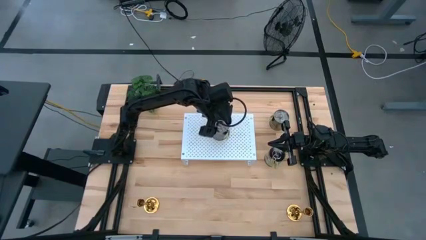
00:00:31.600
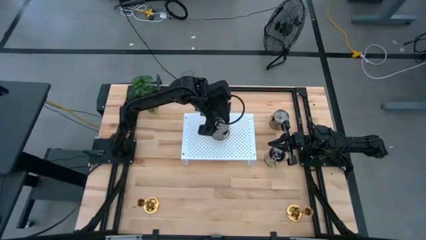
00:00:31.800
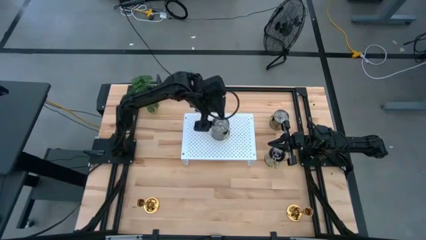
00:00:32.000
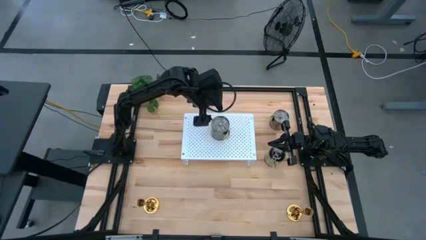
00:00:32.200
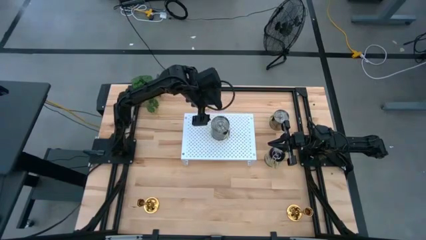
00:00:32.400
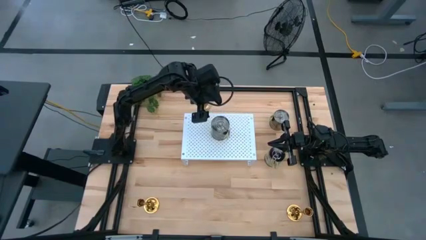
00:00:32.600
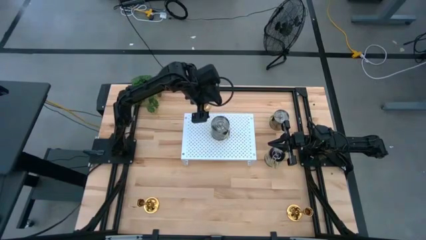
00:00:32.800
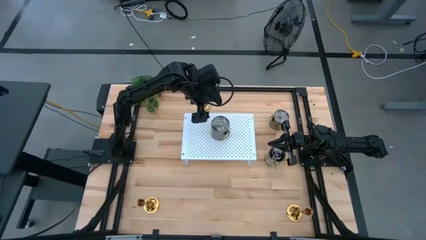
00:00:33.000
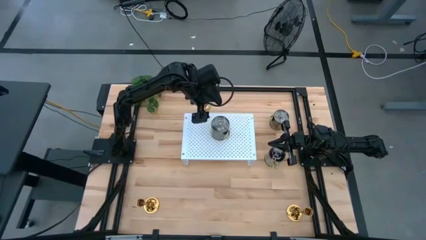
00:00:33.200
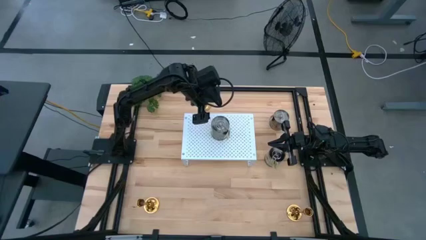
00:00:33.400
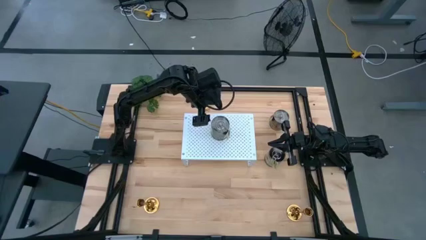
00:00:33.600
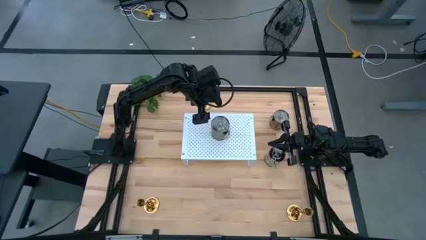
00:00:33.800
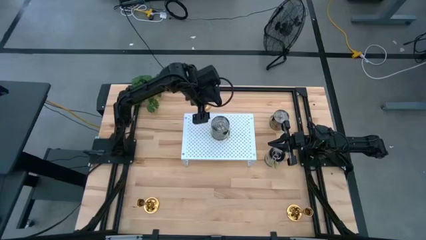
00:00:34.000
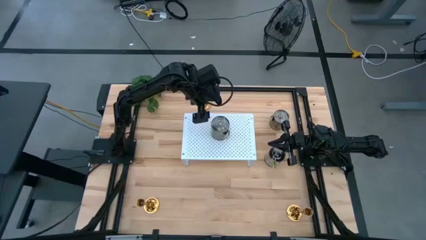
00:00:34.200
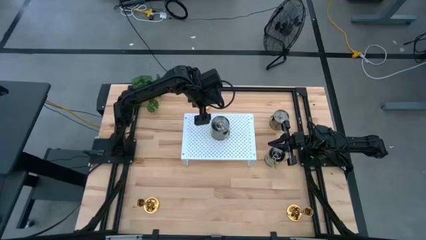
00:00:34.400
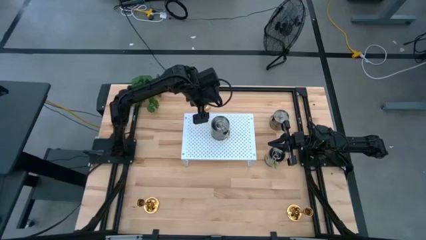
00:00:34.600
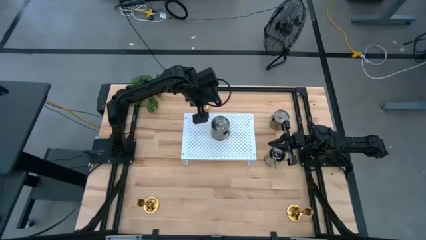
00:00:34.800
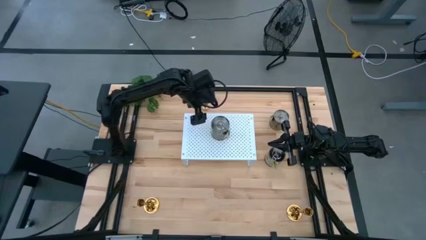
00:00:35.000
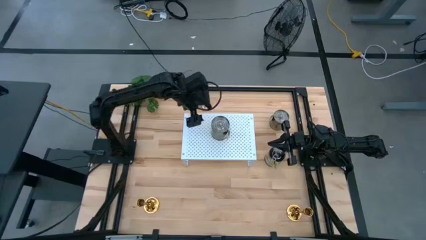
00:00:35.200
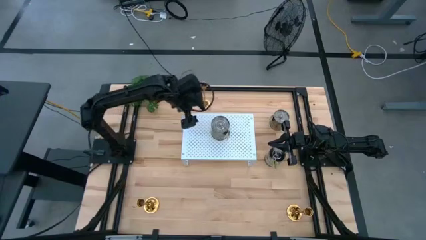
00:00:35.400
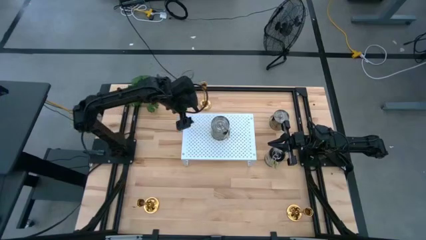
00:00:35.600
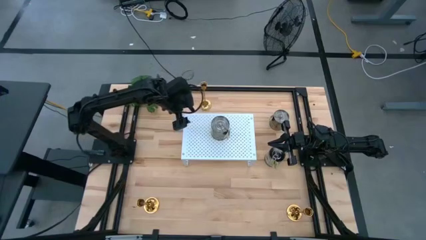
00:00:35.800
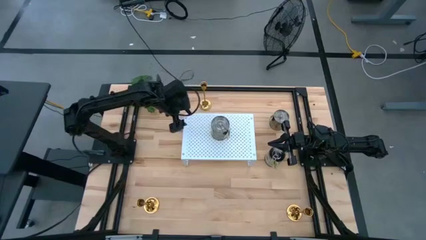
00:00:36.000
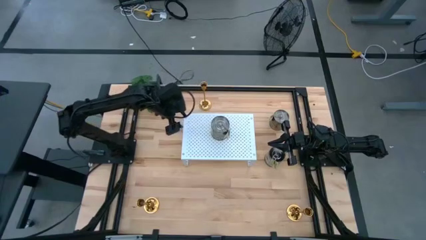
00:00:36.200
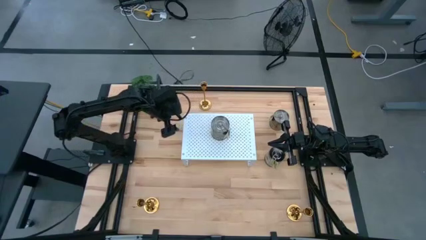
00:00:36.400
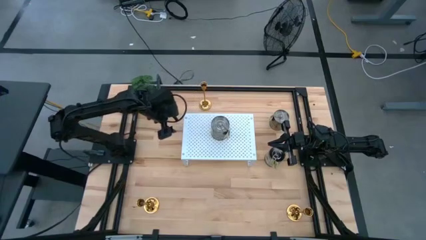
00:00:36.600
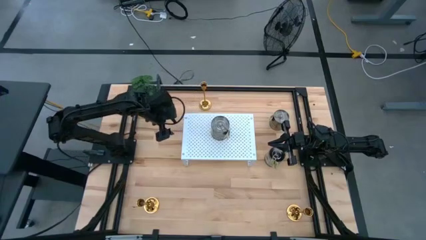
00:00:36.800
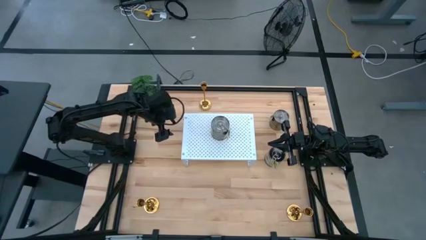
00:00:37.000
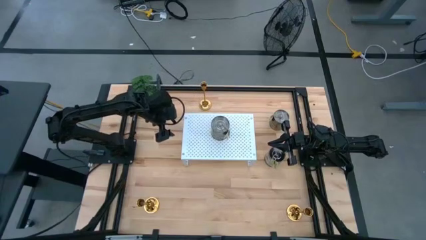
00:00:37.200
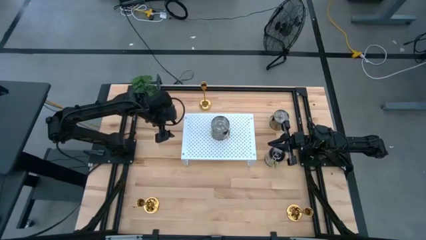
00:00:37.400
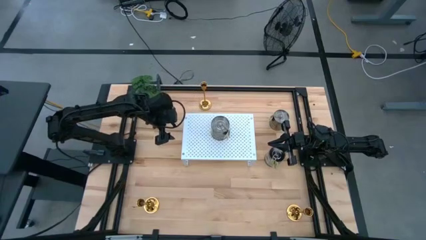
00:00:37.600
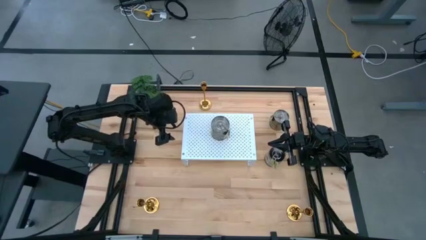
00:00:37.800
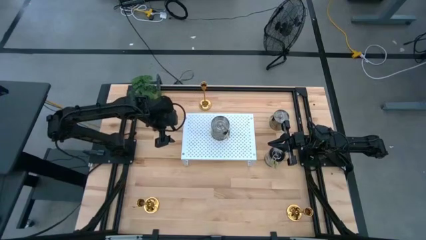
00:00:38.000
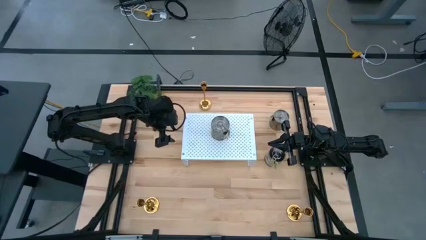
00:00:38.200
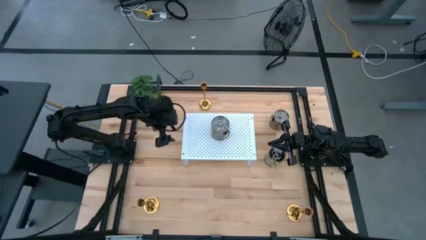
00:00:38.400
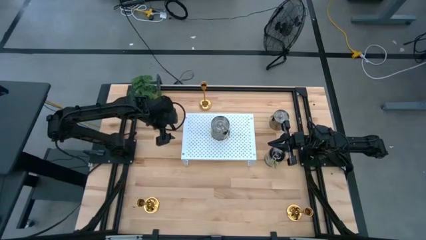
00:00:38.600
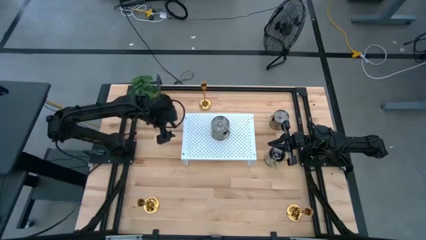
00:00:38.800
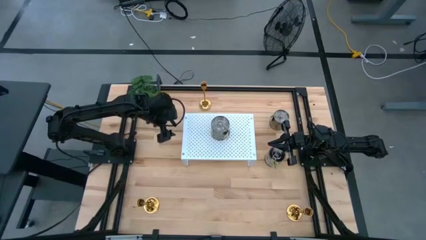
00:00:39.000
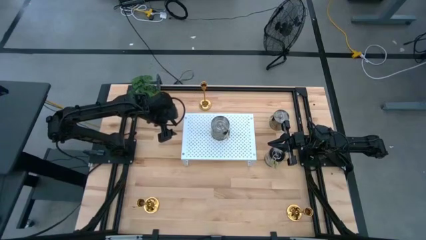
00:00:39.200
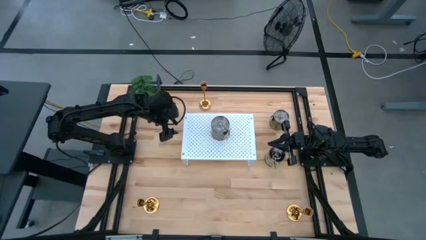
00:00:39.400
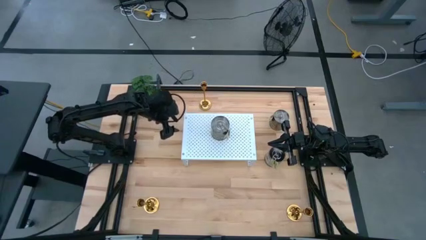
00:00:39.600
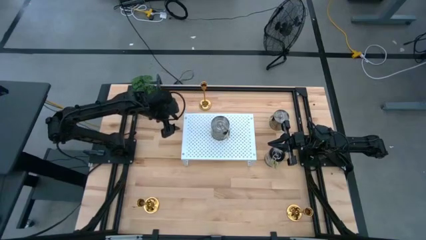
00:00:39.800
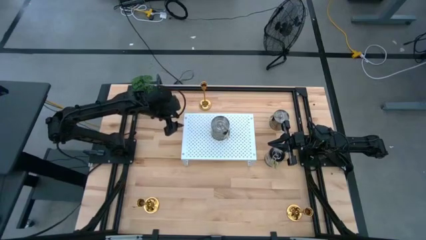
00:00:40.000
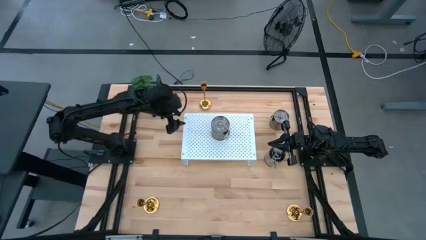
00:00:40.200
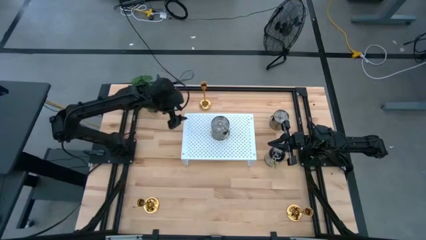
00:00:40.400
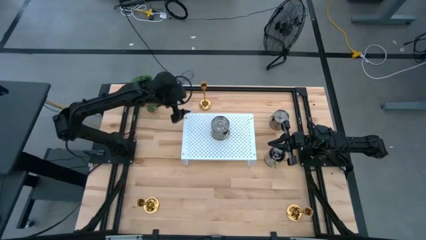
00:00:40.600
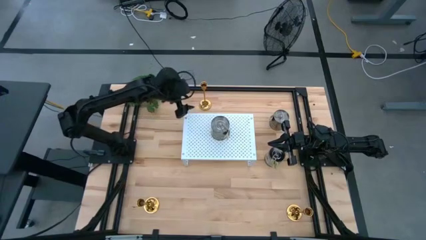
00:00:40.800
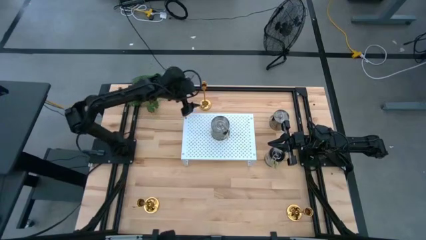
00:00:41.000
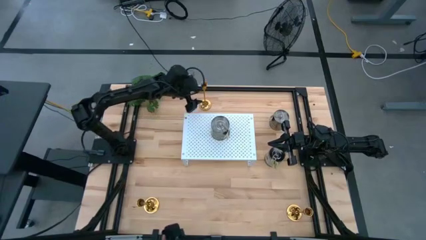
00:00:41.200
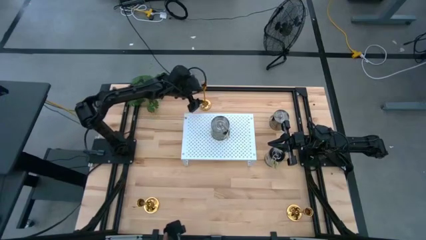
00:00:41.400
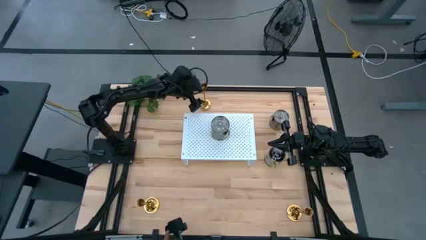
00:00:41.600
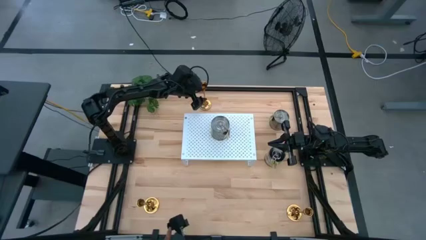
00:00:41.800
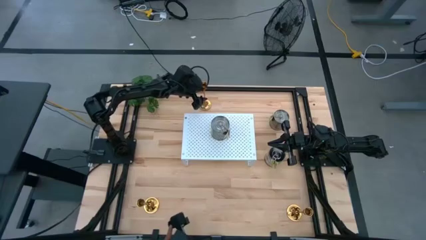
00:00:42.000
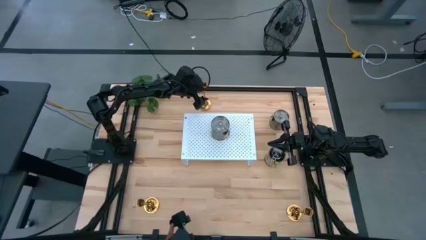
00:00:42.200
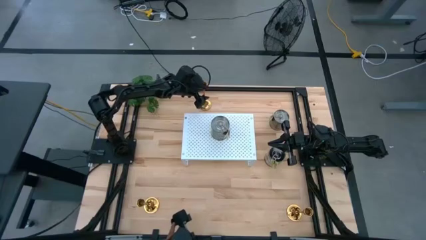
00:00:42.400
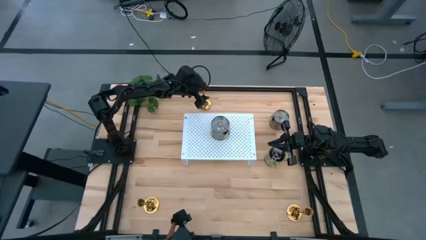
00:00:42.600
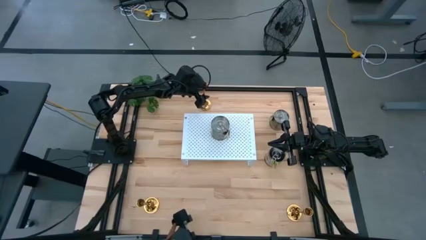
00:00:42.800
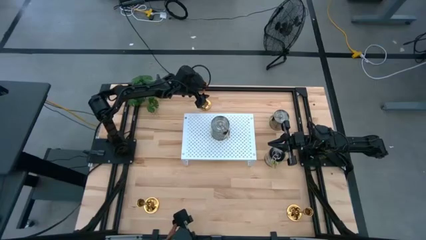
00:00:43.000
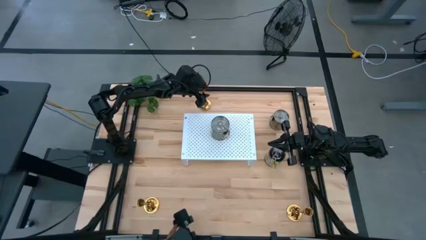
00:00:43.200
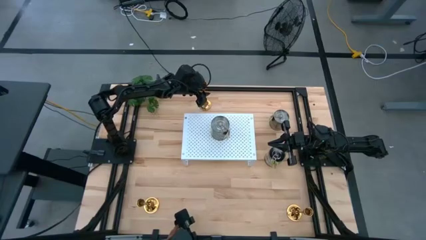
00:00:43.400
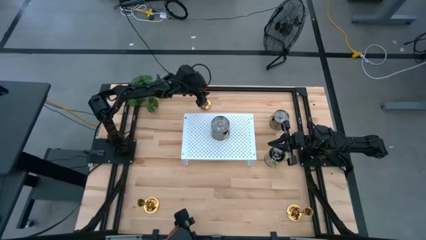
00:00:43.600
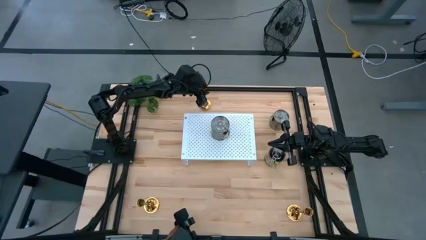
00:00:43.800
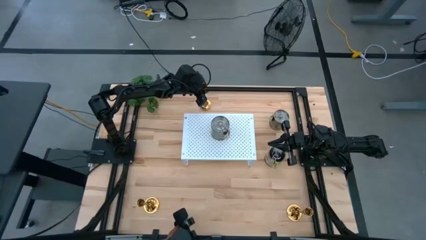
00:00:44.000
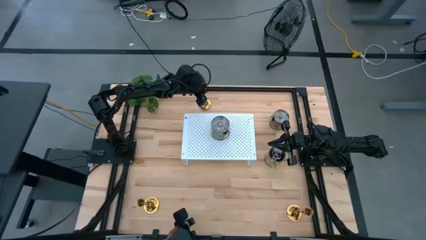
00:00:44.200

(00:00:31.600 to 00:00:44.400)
Task: Pick & Place candle stick holders
Put the top center golden candle holder on the shelf

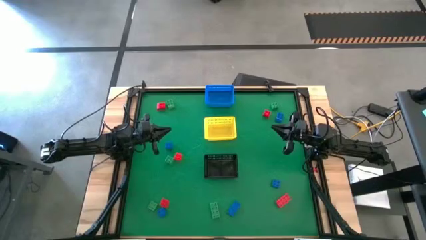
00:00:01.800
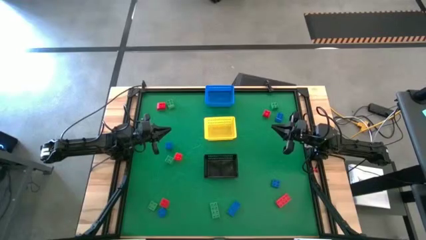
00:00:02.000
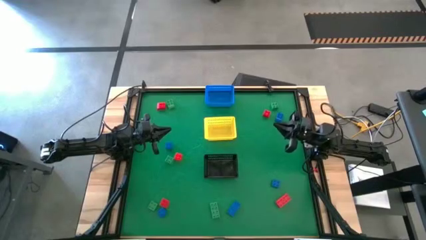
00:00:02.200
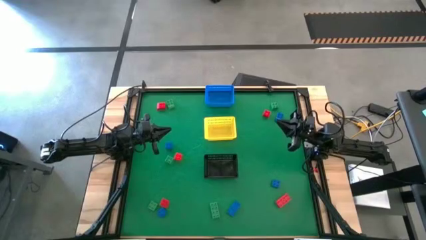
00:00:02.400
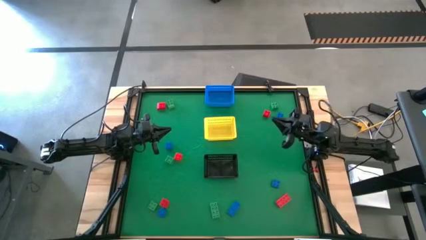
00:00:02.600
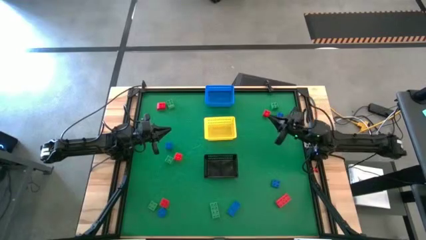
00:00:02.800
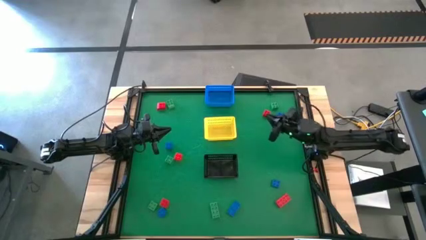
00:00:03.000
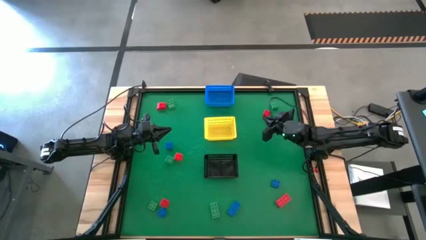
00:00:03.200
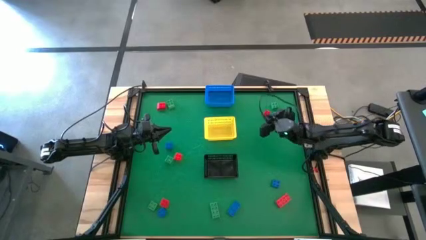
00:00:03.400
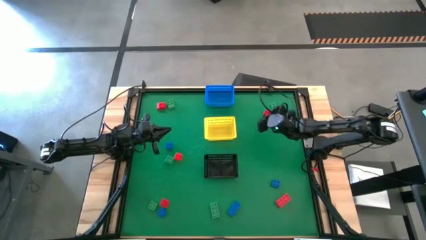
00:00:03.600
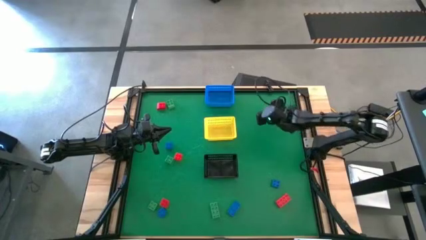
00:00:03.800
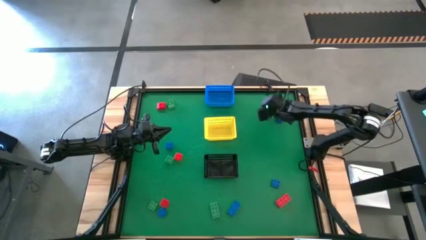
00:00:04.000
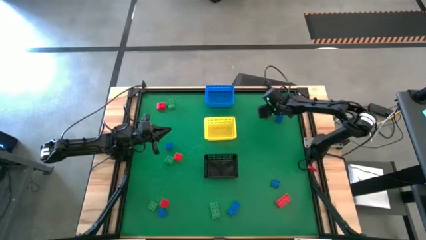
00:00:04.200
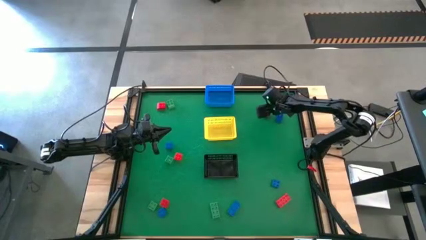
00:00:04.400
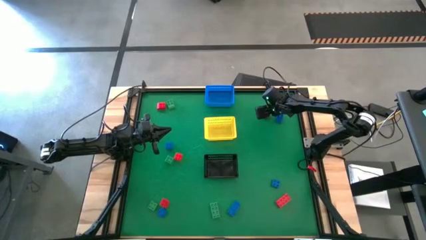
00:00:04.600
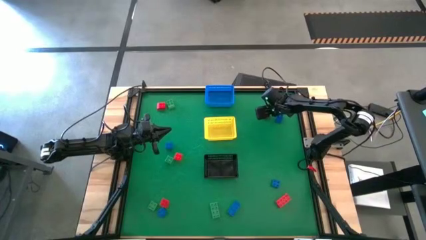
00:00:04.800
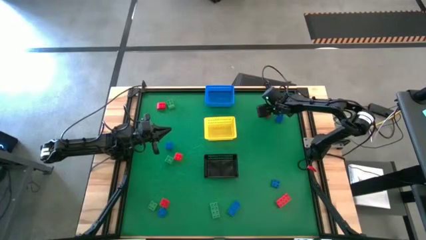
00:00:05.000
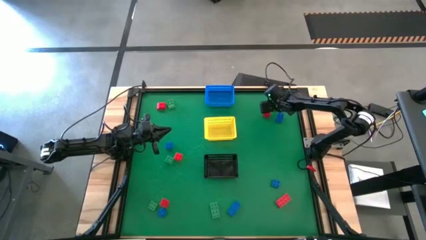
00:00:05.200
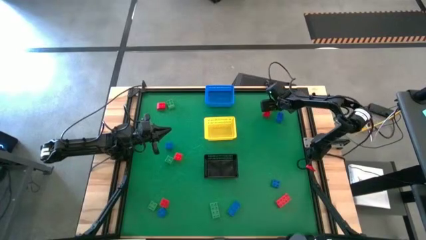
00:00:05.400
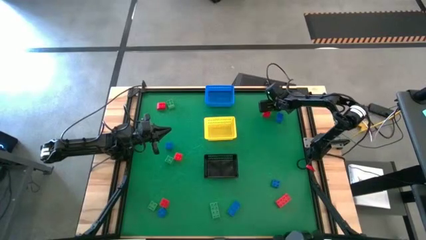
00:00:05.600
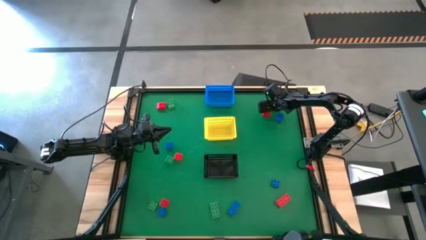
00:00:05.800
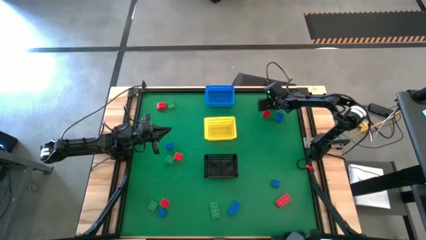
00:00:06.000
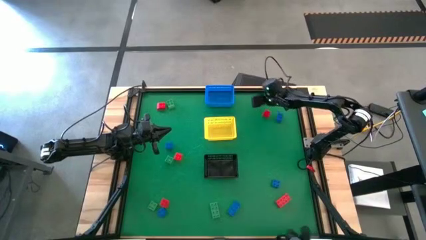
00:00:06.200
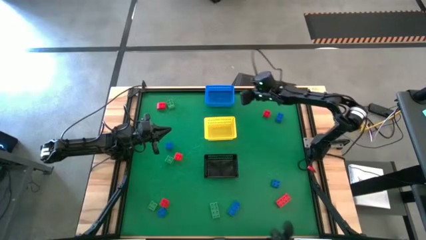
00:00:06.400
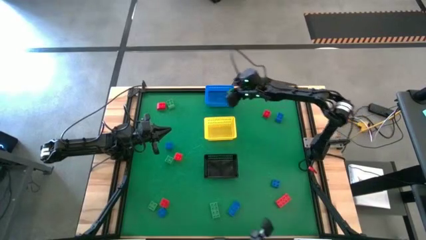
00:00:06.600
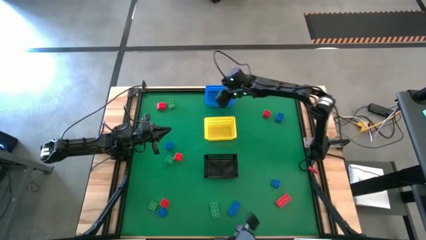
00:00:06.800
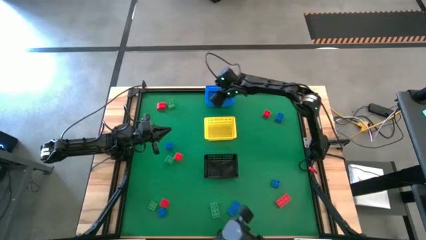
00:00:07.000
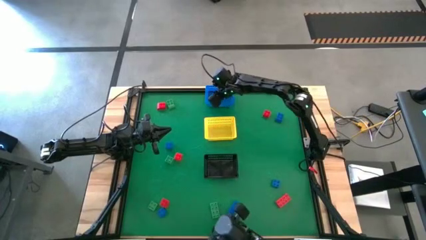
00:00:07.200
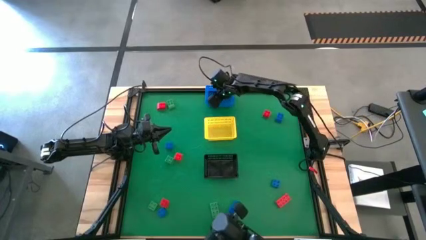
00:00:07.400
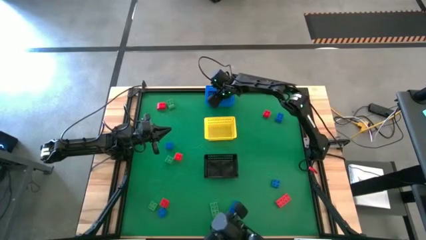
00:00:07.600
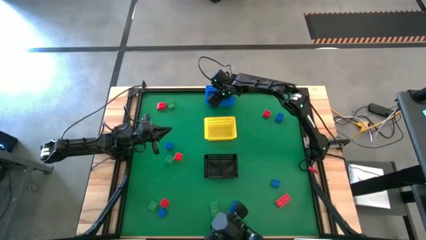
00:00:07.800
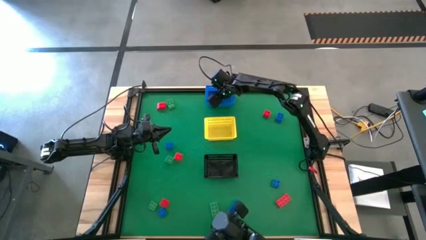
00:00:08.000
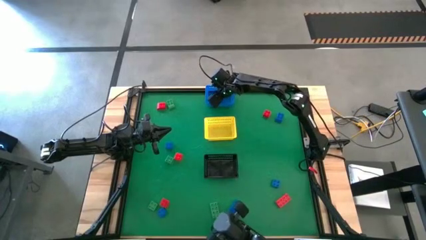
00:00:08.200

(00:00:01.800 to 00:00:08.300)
Task: Sort & place blocks by color
Put the green game piece into the blue bin
